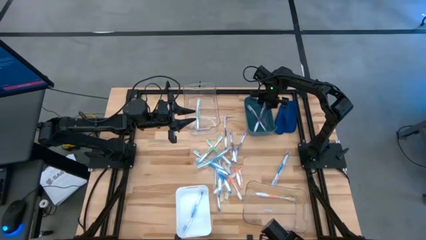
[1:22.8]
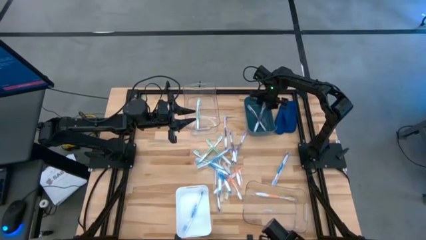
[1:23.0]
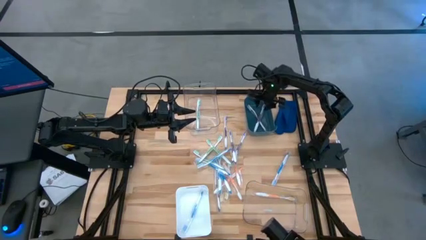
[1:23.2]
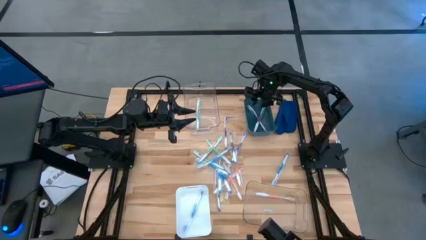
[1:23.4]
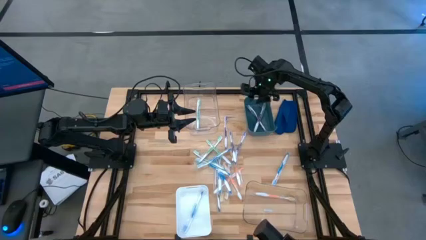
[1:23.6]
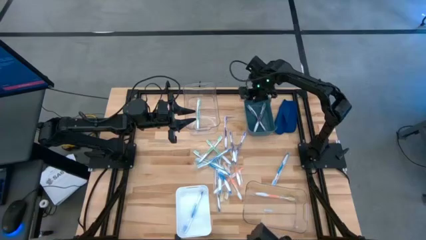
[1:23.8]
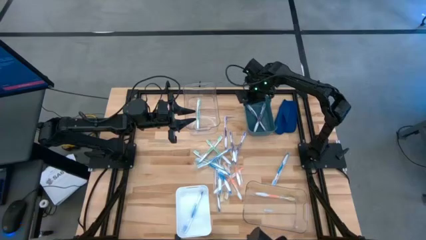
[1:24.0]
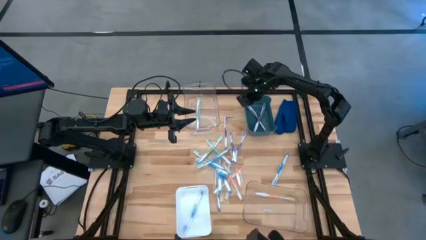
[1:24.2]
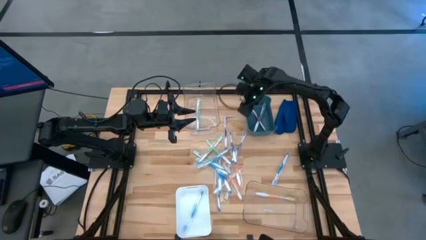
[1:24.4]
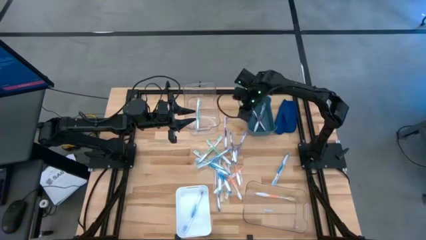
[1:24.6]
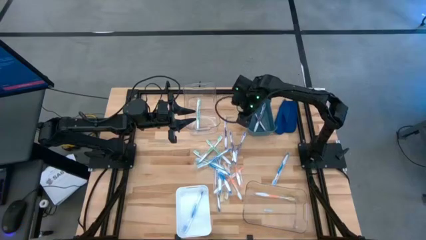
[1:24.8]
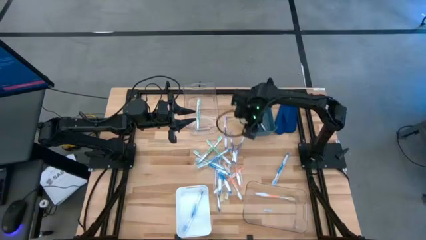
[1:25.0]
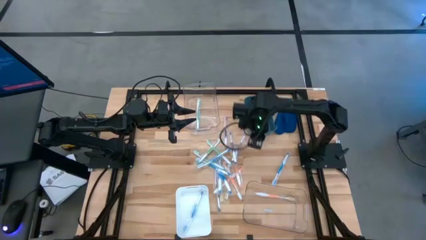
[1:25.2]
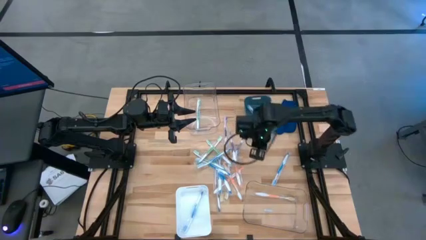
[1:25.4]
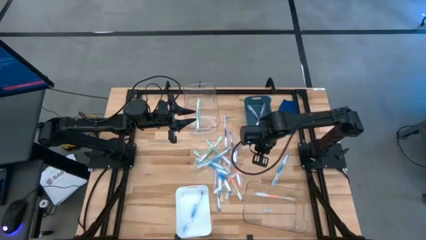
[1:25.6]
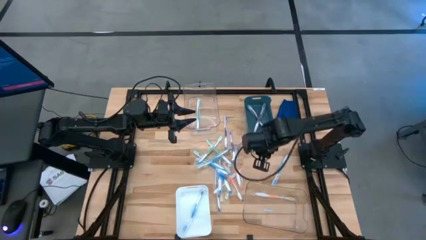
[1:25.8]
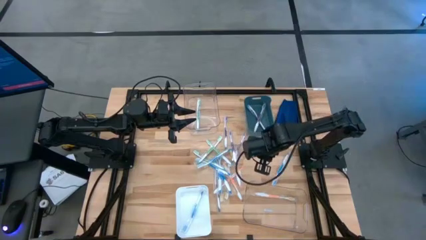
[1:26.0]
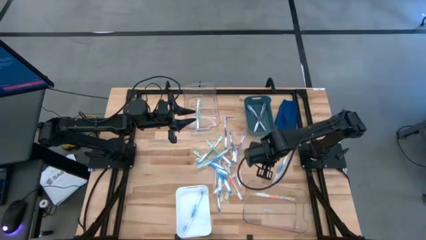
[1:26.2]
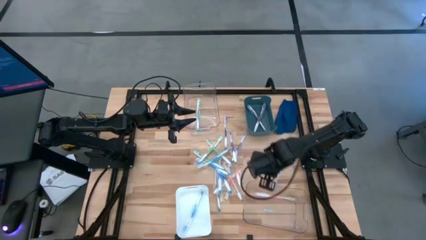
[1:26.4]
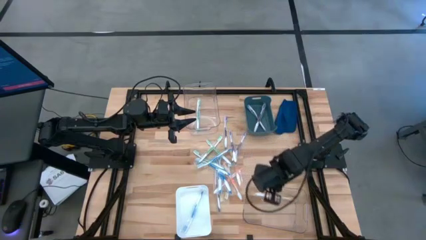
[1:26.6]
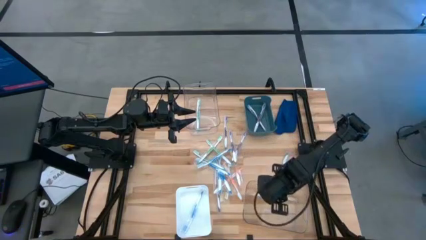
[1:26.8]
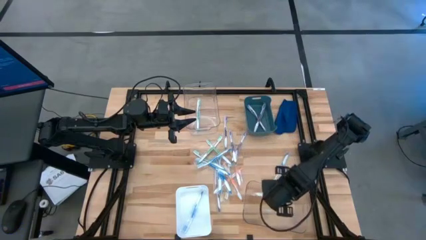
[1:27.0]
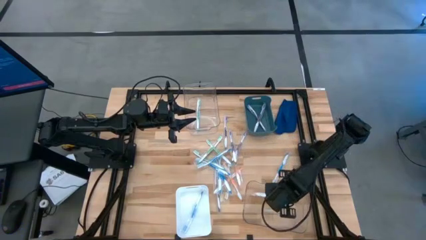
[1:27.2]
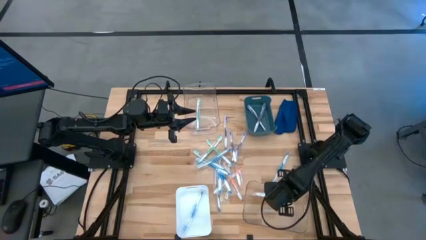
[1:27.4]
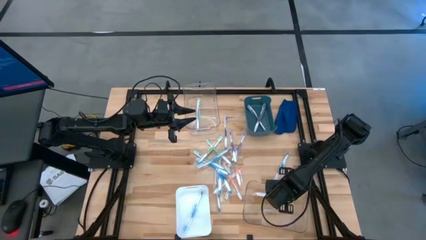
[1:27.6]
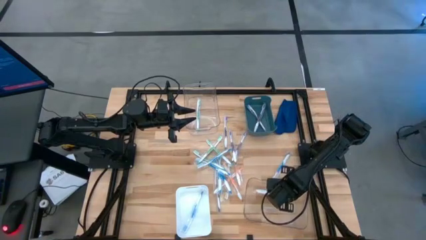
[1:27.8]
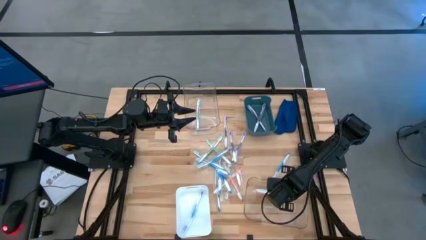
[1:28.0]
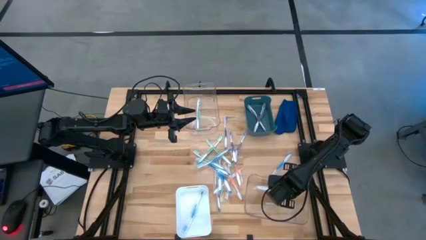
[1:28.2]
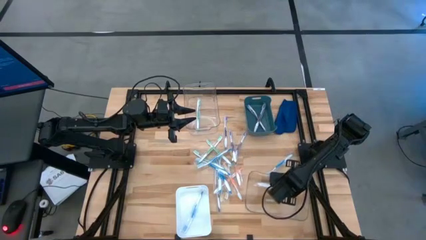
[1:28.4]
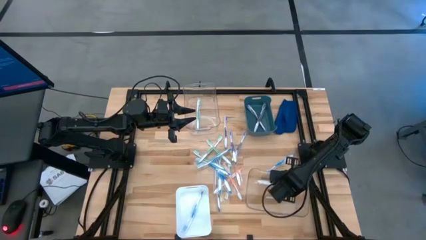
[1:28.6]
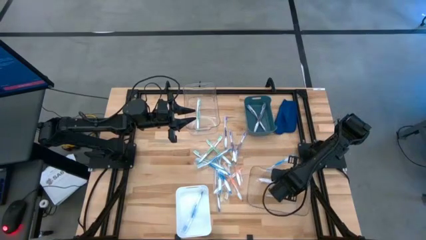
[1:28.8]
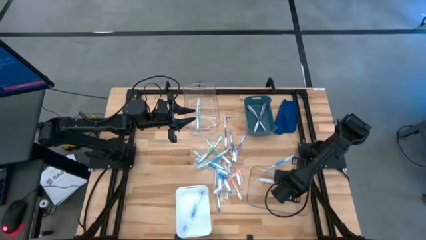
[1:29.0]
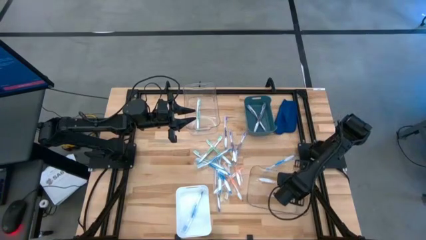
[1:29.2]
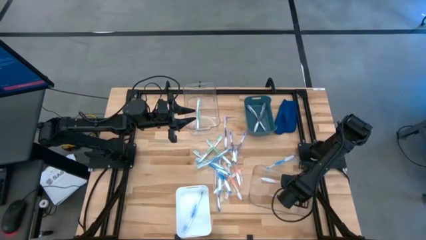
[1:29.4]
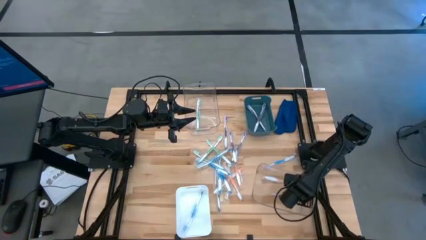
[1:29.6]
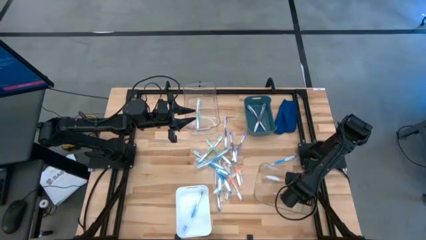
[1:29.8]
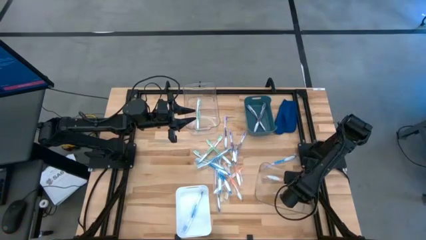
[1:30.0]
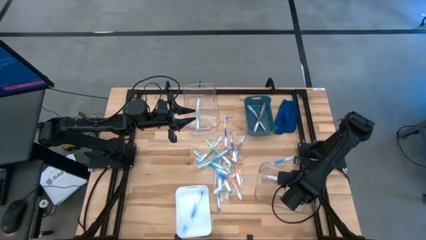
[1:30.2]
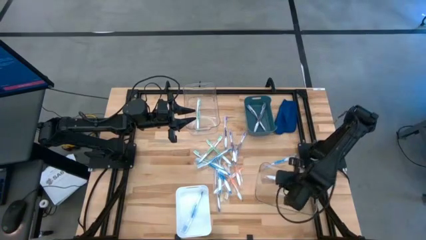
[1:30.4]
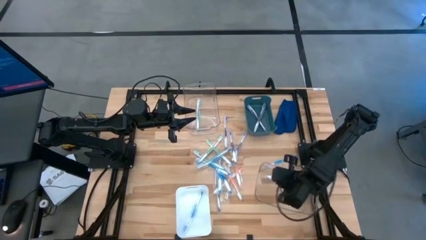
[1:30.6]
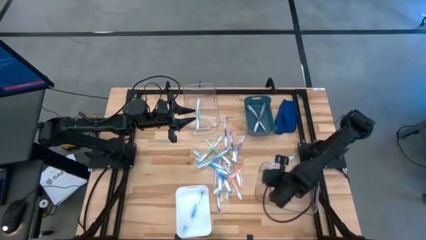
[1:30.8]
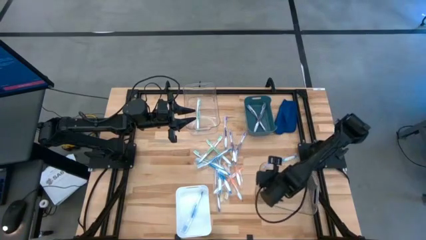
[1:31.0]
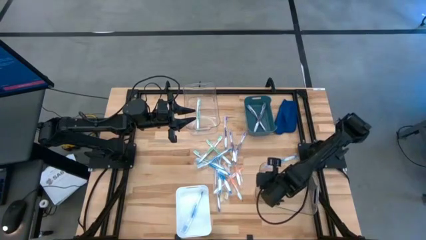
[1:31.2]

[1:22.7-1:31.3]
Task: Pick & Place Toothbrushes
Adjust the bottom transparent bin

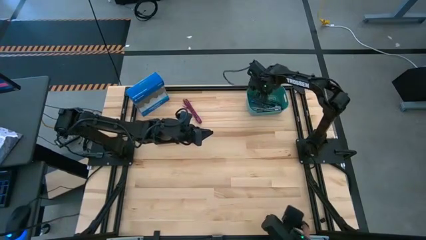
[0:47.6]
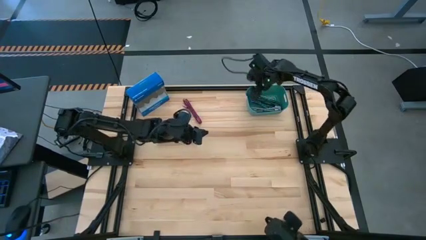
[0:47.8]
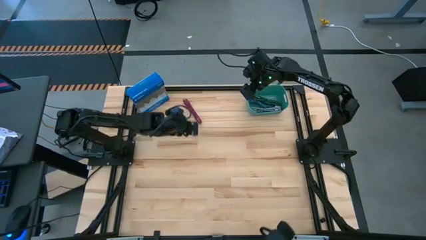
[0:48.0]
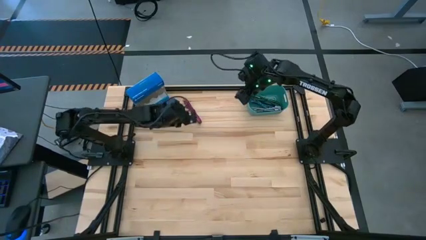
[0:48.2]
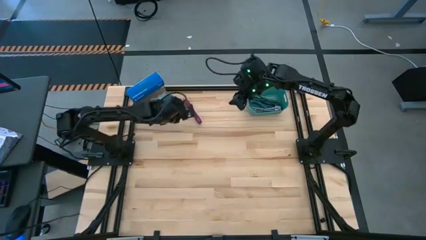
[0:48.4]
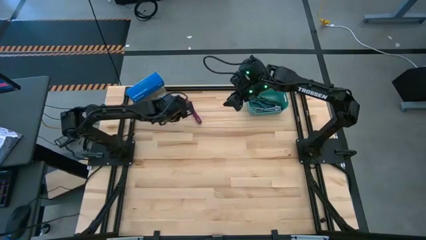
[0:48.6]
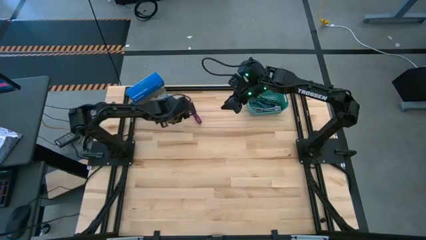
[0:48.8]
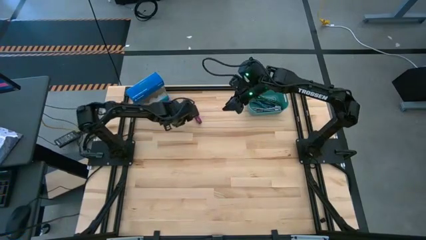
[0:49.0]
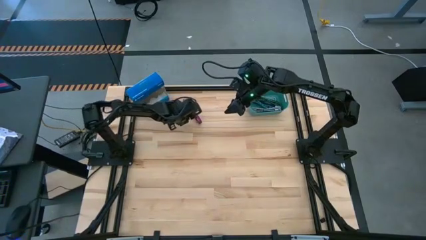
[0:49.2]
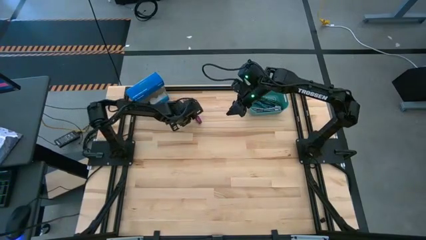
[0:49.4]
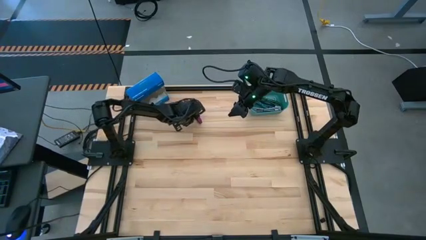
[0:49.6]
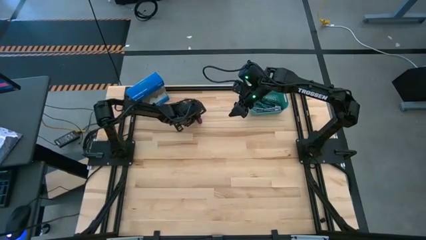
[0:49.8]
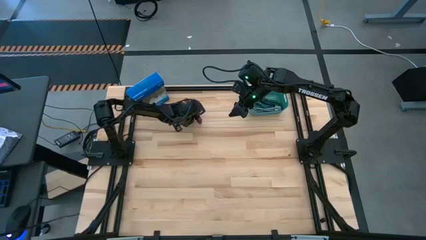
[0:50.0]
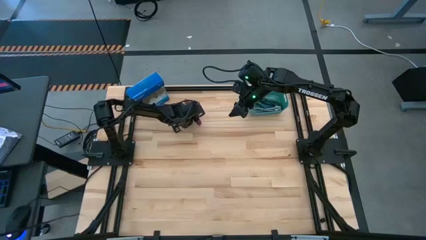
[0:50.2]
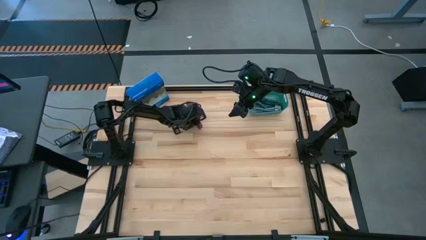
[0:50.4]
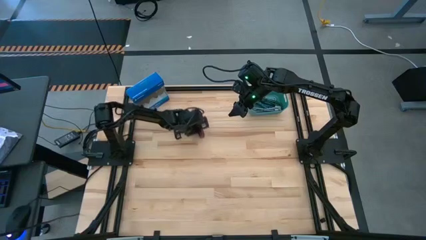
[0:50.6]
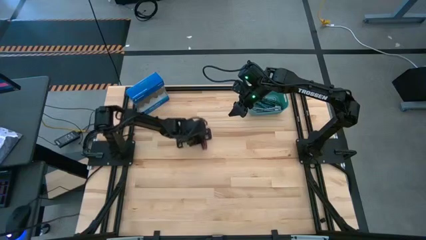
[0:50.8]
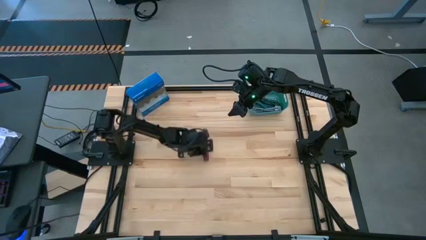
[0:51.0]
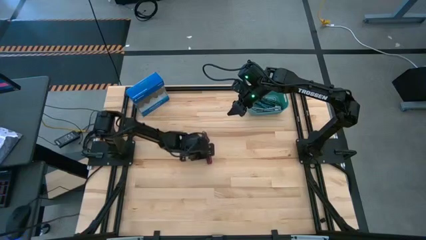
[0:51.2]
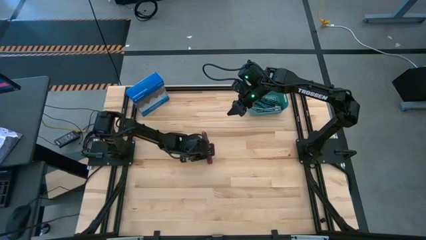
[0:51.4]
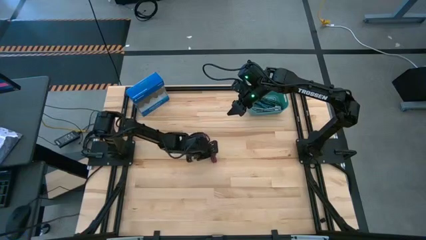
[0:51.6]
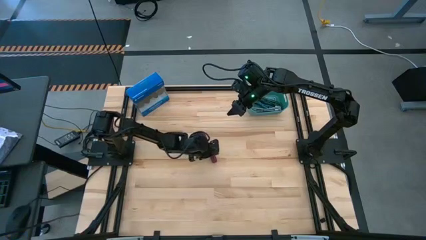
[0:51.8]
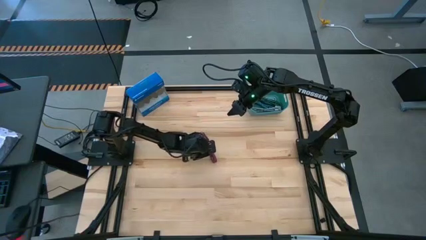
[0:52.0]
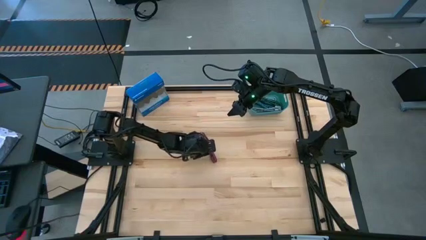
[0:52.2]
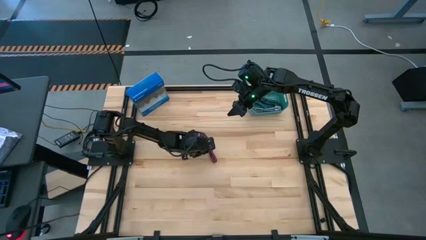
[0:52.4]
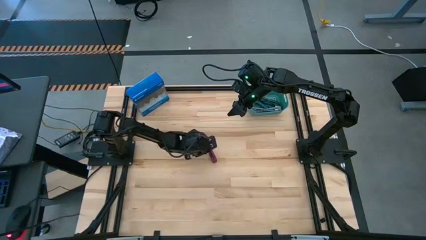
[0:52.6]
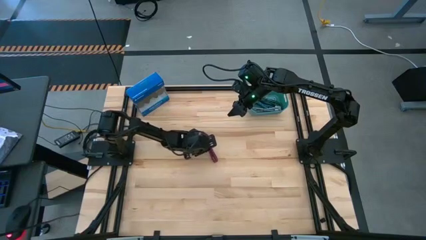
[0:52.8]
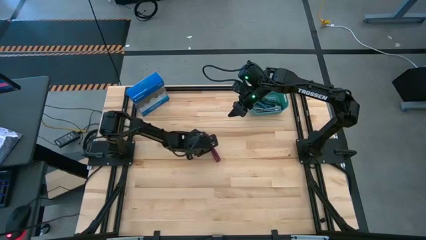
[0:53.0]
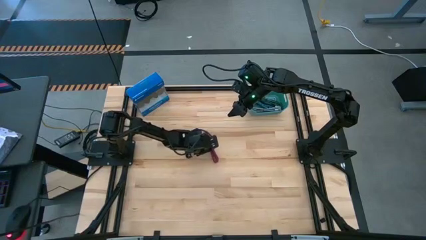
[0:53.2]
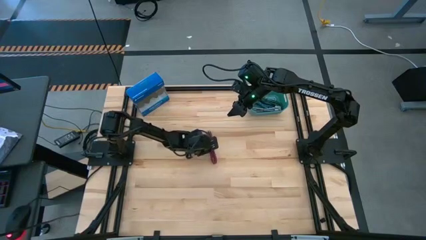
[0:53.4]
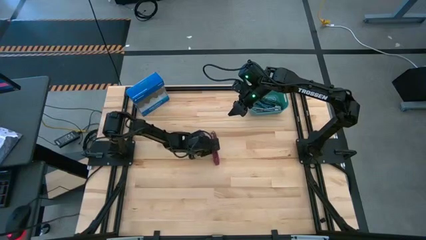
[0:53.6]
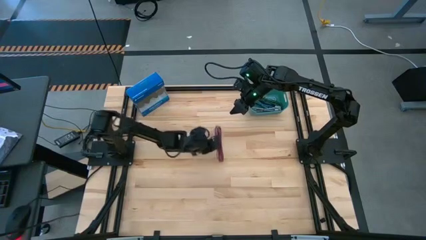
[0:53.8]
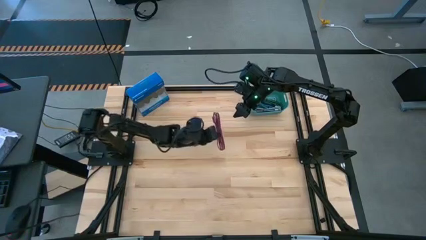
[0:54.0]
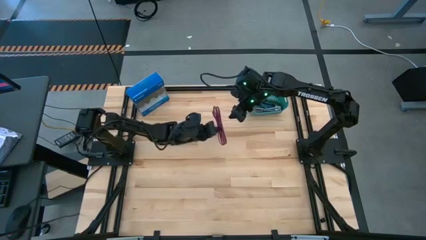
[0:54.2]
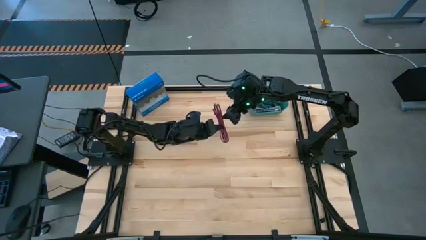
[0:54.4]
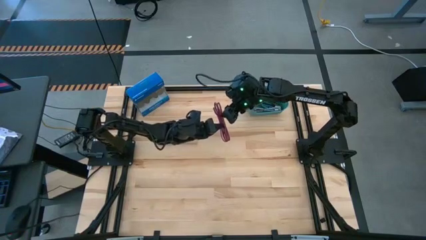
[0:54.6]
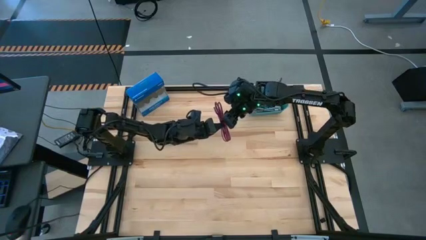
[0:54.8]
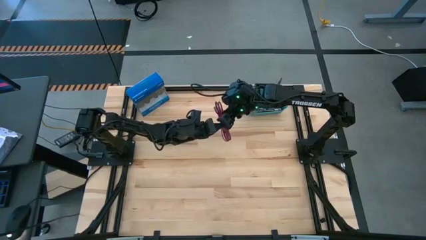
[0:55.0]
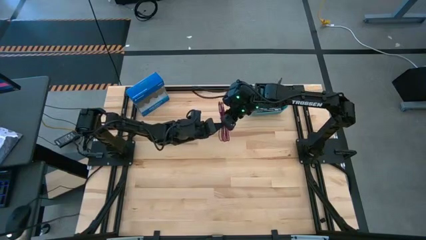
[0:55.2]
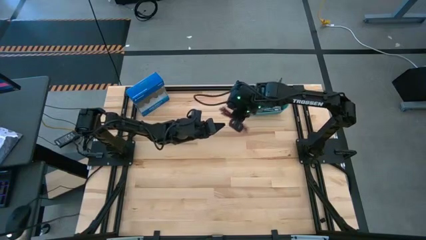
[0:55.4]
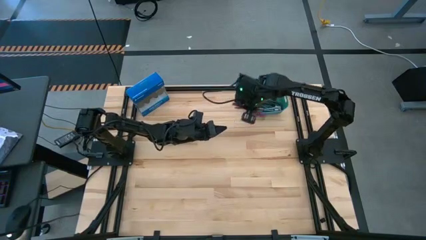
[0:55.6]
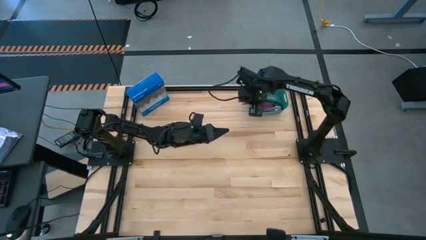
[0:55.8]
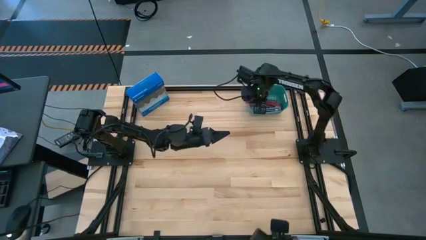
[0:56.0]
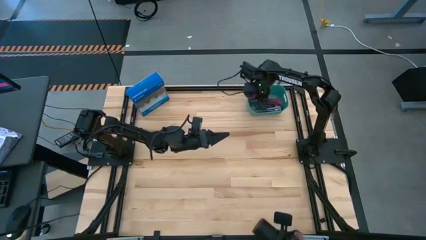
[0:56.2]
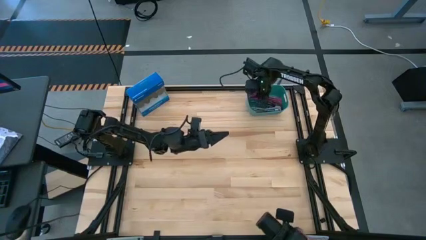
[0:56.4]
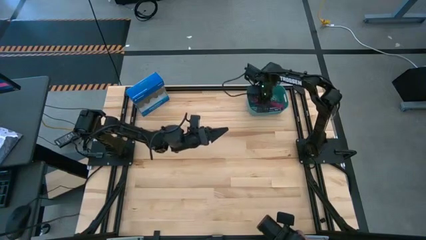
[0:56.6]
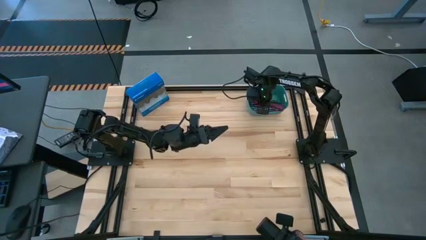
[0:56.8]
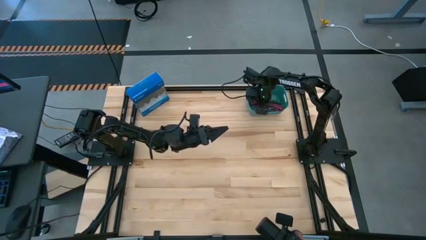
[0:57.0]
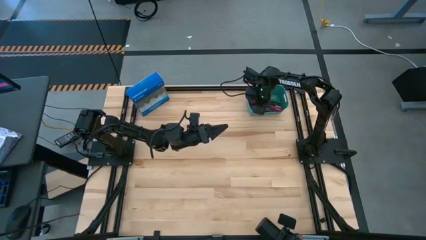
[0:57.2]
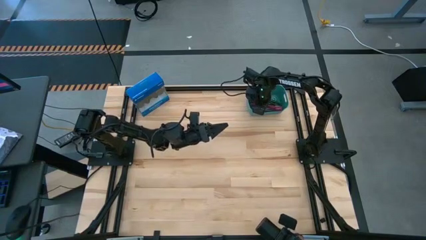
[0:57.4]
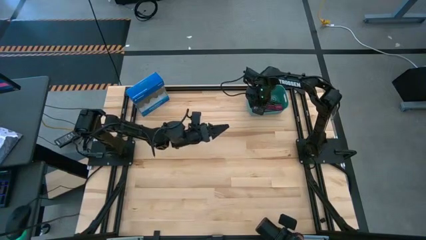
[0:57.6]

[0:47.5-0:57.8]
Task: Pick and place USB-C Cables
Put the pink charger cable into the green bin
